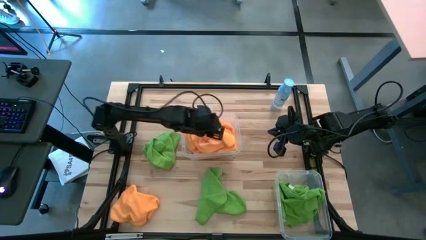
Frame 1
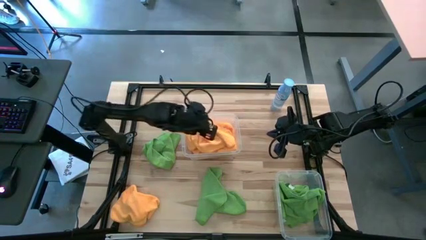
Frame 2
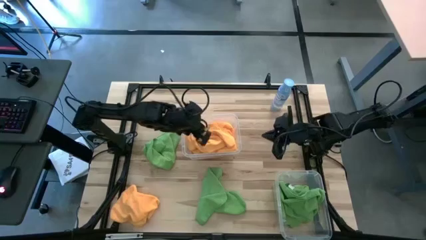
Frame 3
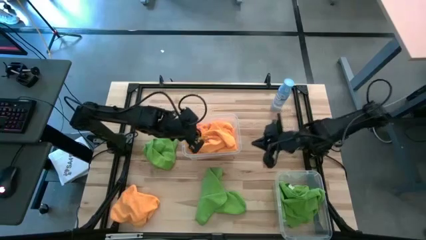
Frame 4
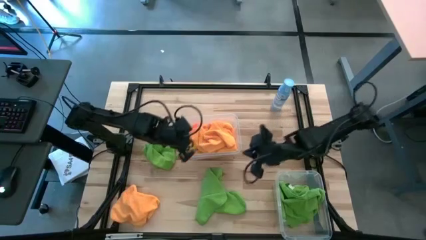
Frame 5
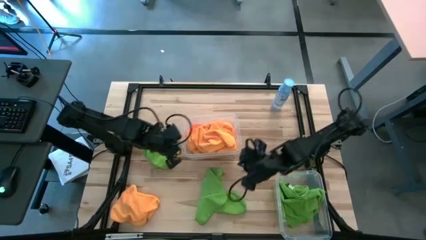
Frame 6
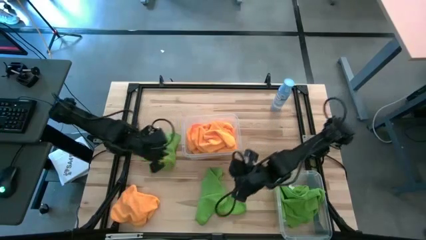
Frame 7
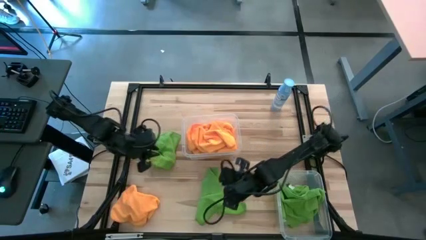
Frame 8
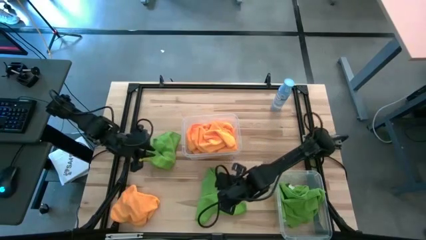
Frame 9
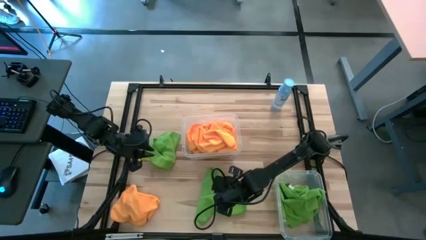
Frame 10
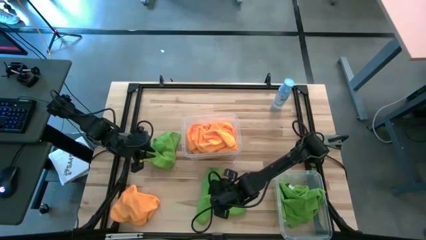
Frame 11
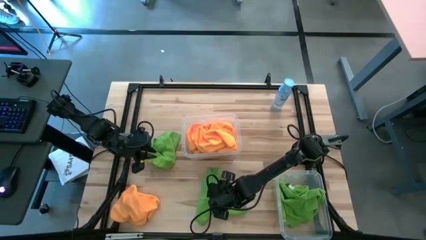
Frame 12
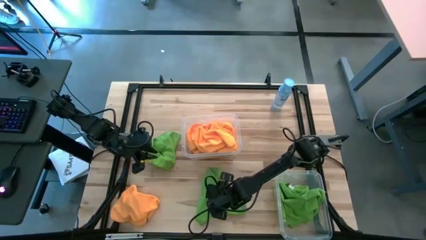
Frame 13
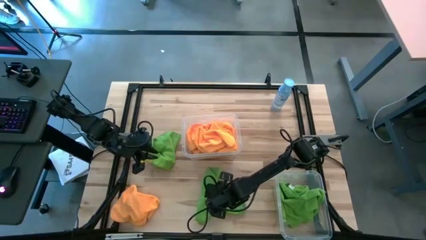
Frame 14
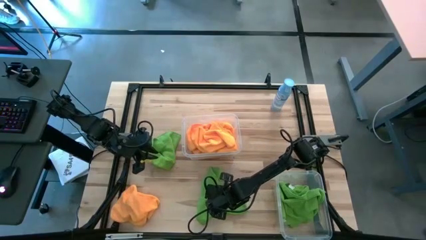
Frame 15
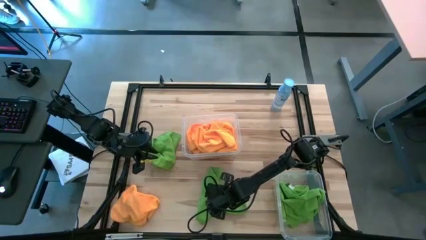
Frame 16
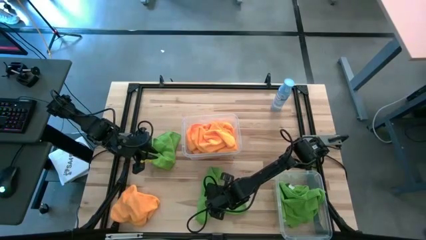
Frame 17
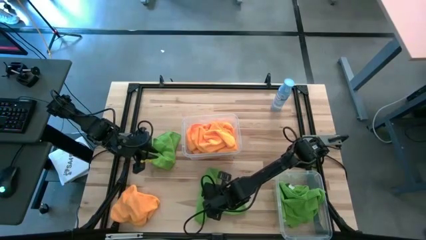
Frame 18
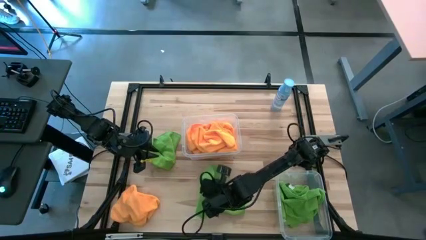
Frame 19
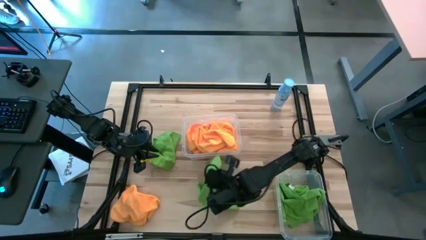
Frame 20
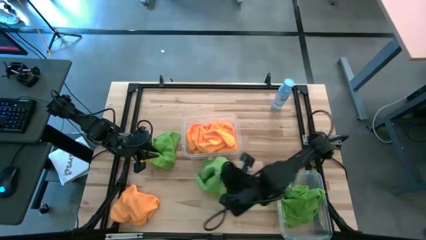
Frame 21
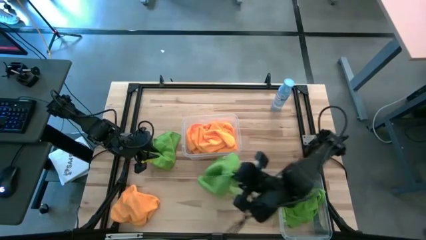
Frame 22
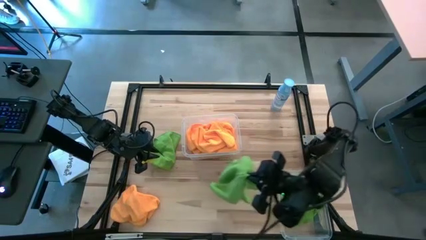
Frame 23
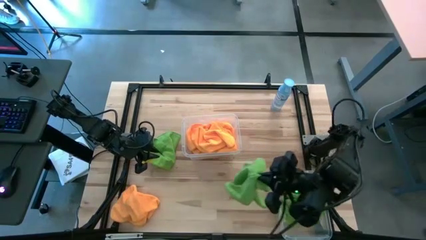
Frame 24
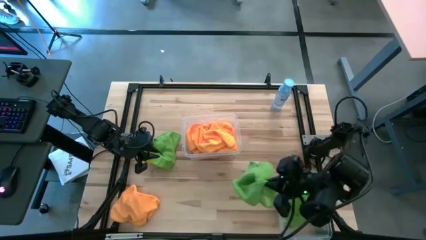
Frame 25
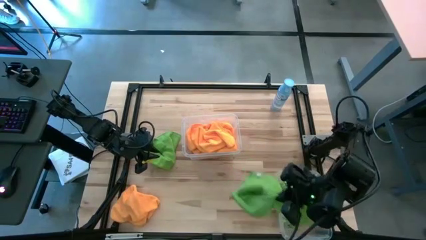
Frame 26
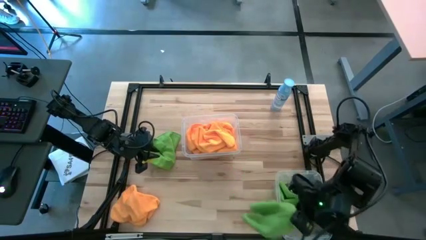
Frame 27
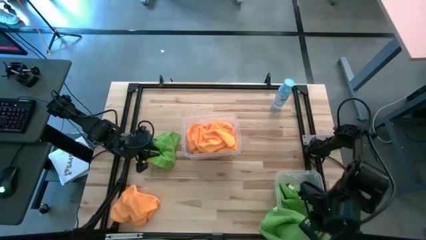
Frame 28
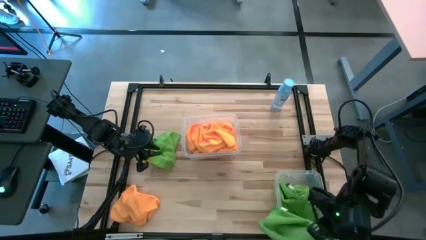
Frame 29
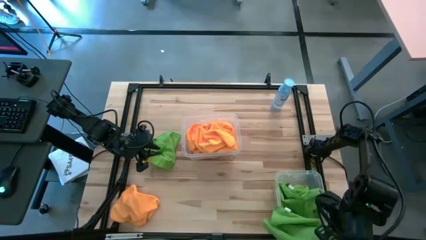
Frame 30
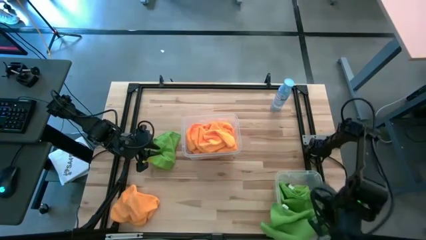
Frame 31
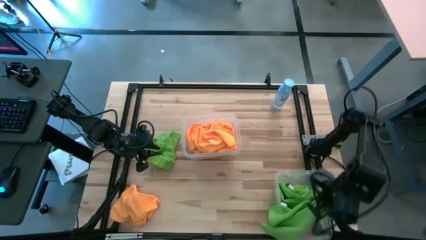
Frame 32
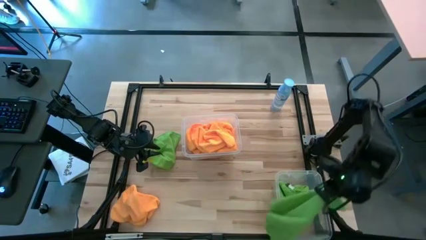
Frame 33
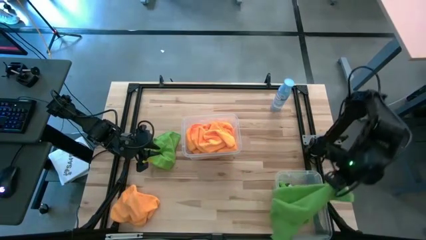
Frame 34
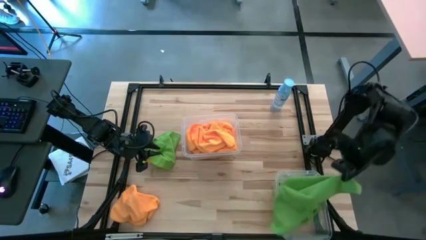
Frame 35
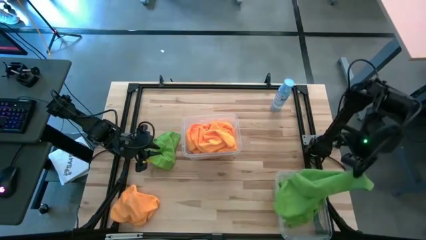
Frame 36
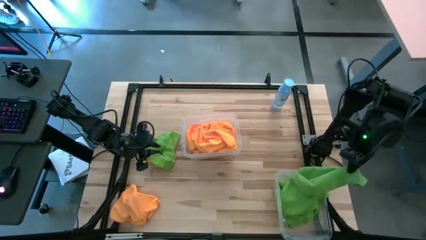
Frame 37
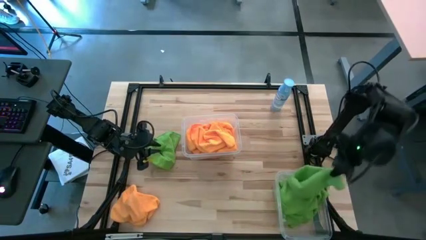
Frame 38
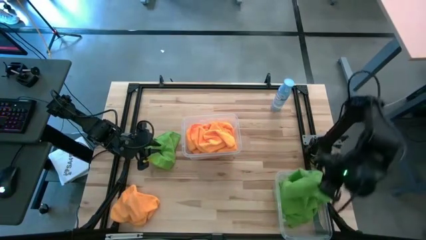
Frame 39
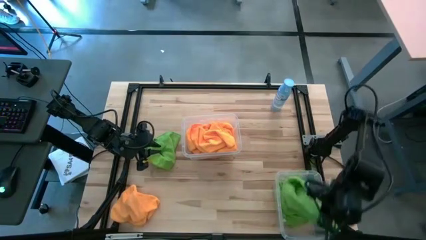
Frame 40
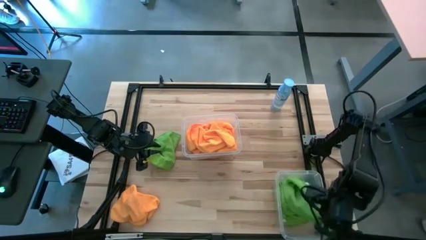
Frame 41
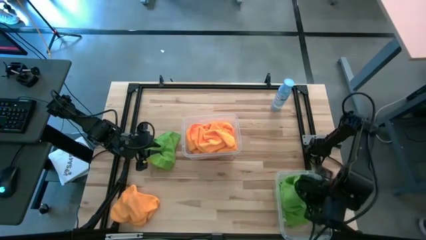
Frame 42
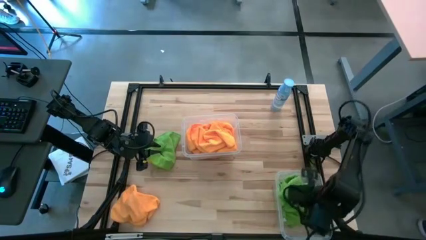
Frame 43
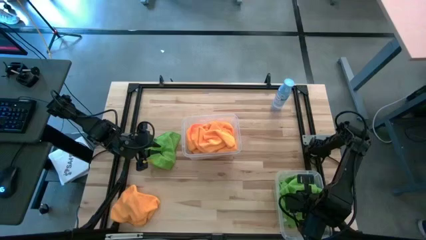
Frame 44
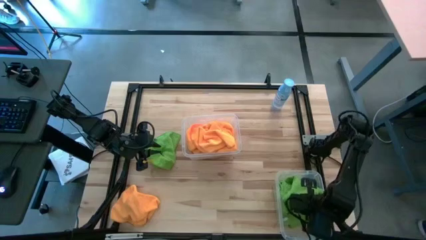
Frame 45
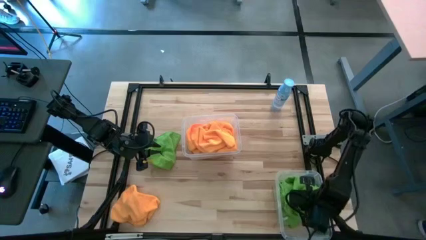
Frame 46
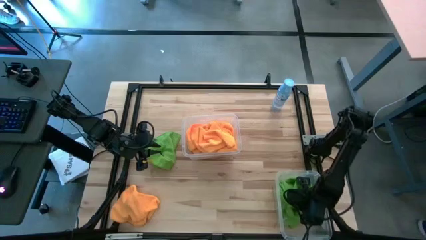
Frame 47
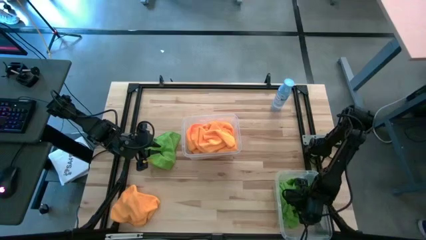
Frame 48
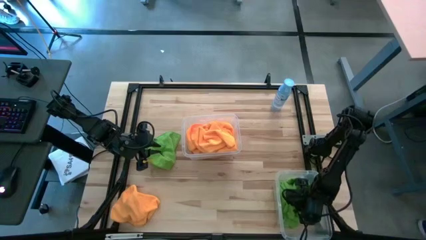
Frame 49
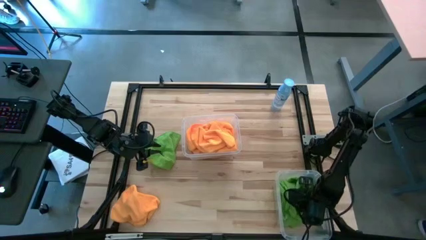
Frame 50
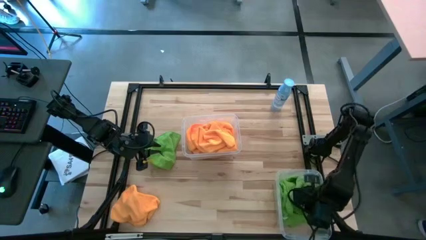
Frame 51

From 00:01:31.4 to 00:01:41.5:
Task: Sort microfiber towel by color & place in baskets
Put the green microfiber cloth into the bottom transparent bin

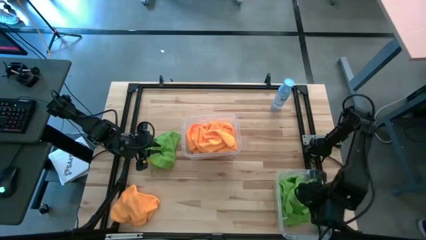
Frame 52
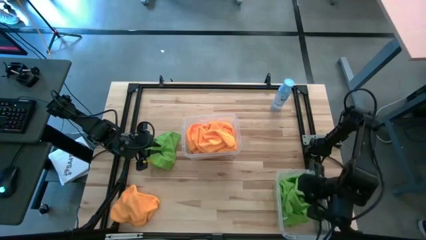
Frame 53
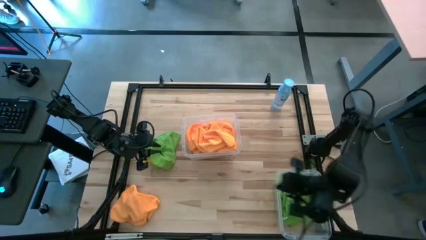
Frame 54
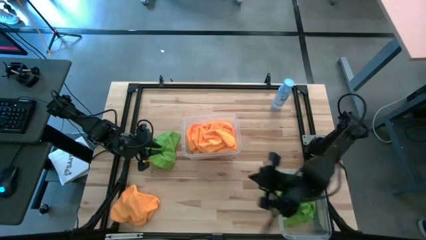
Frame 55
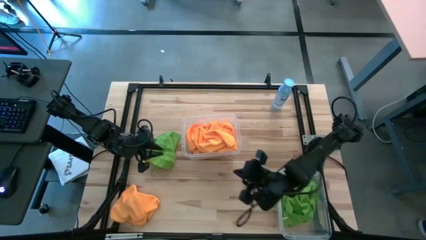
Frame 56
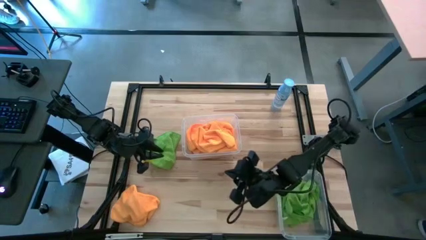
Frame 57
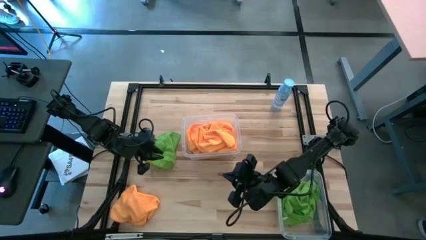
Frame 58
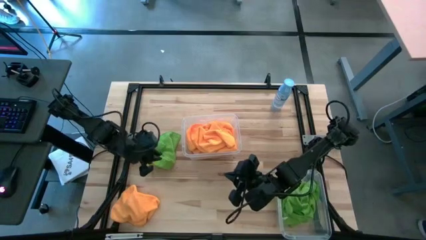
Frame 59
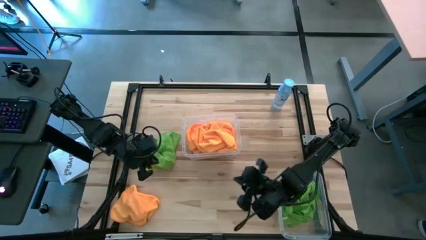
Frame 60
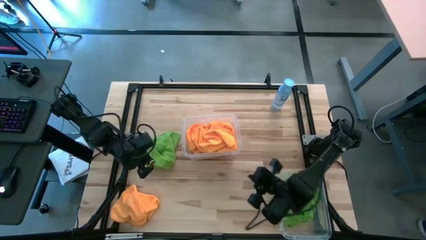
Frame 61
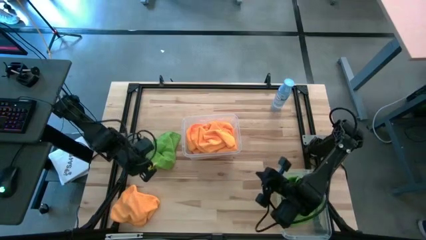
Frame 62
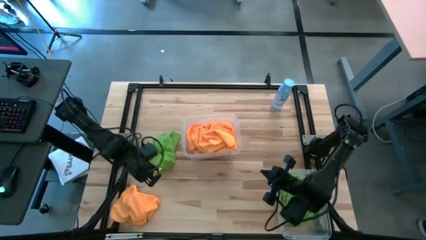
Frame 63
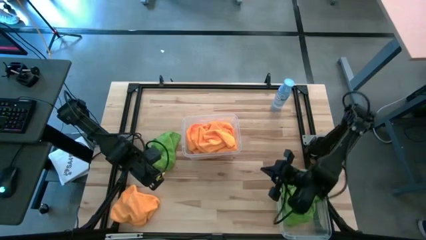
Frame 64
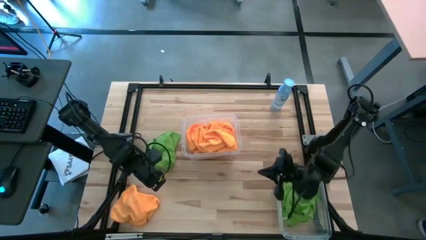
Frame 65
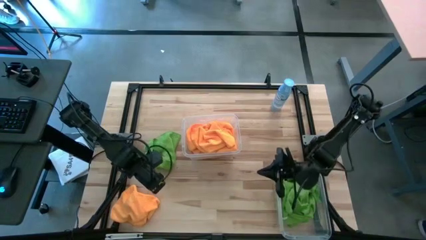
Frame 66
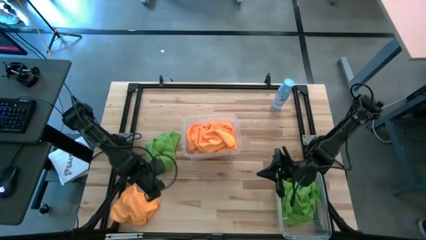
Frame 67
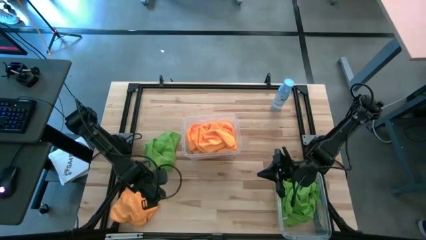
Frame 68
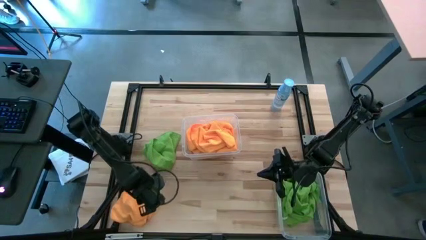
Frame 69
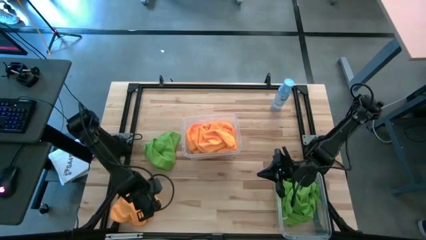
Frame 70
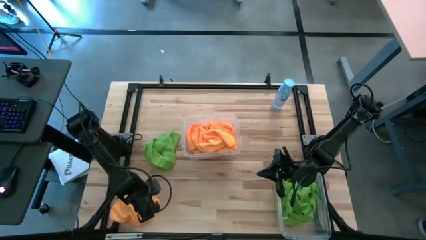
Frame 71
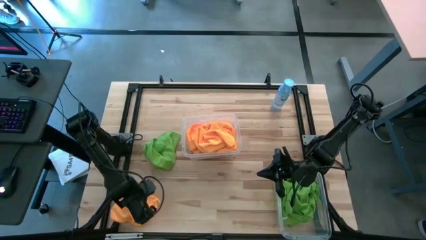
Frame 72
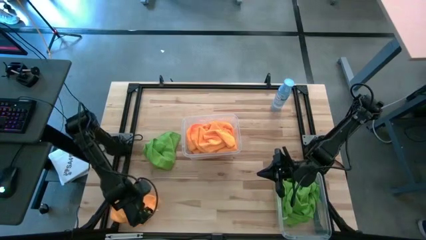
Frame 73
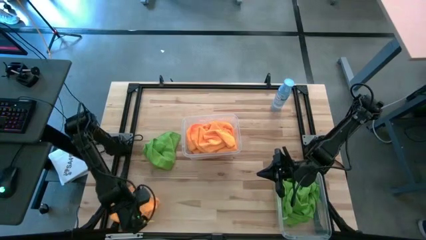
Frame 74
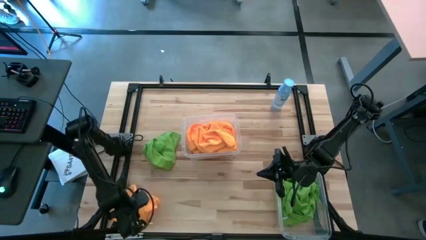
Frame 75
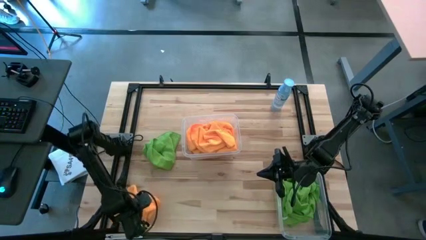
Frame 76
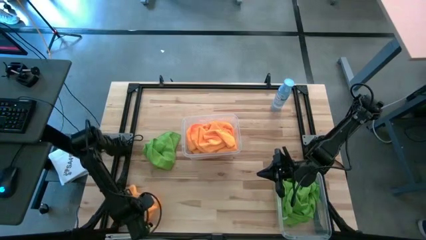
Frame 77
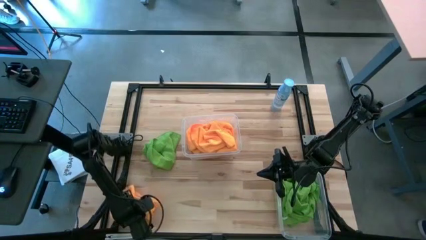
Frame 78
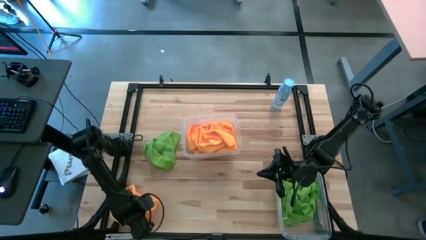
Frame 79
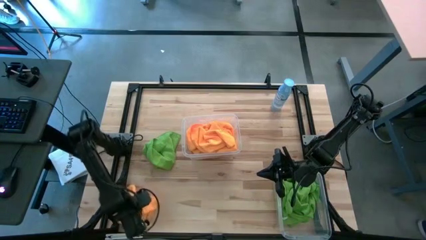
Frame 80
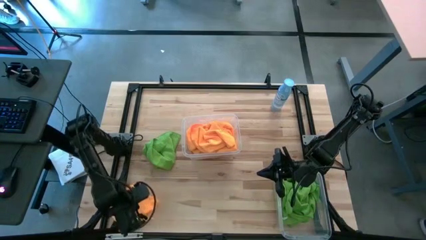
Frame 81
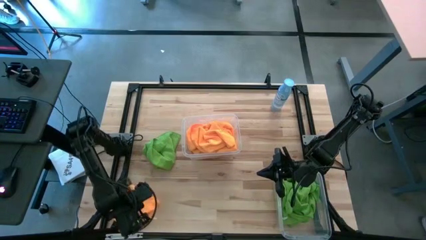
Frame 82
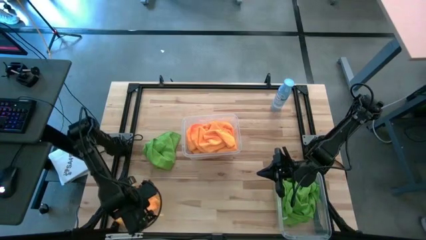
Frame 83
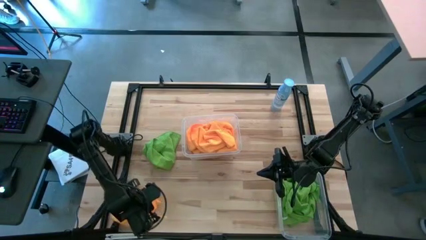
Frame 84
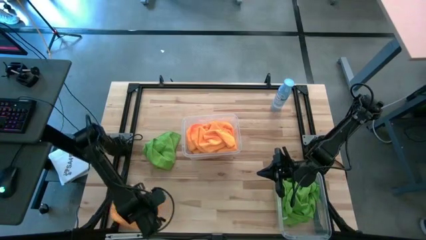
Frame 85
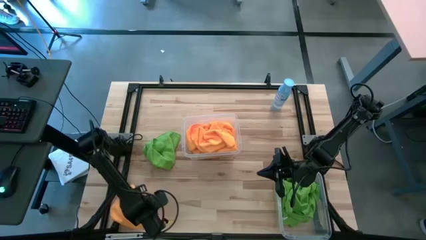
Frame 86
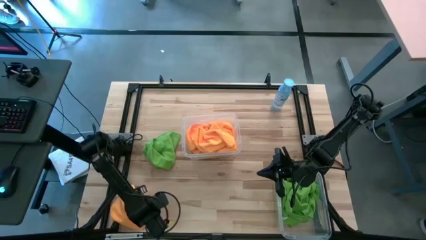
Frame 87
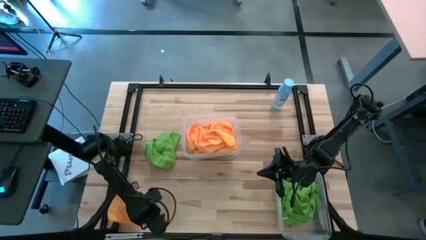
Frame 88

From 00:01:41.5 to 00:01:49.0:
Put the yellow microfiber cloth into the top transparent bin
